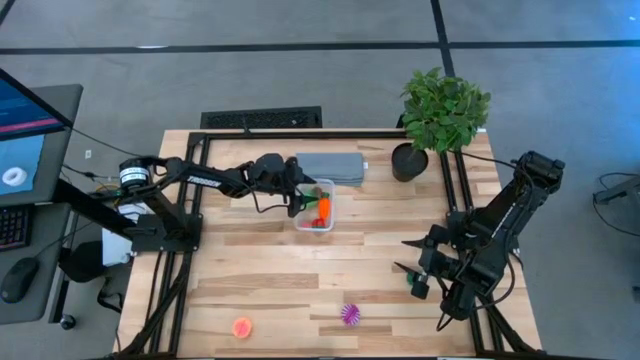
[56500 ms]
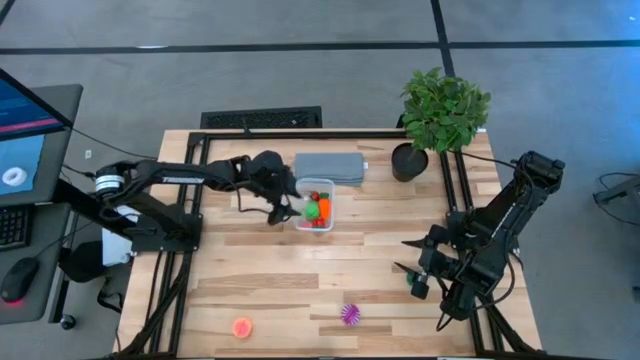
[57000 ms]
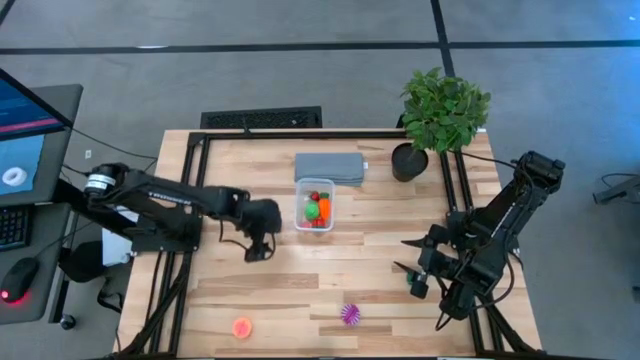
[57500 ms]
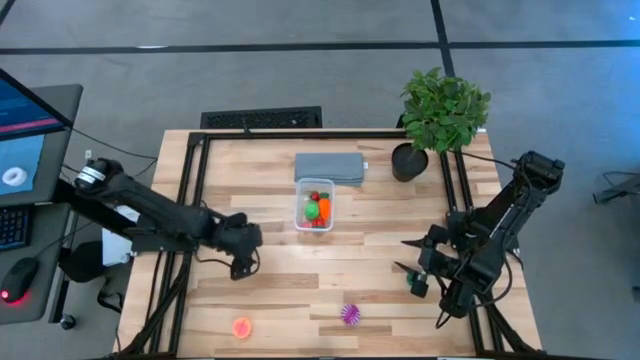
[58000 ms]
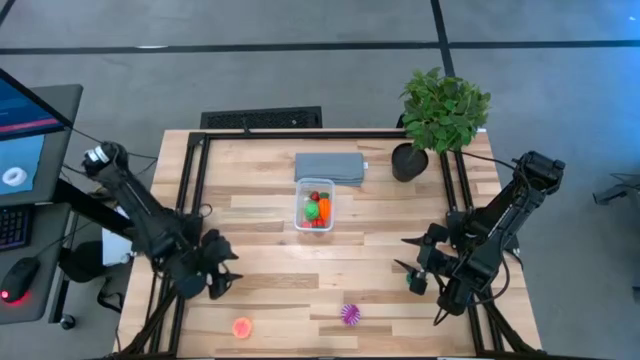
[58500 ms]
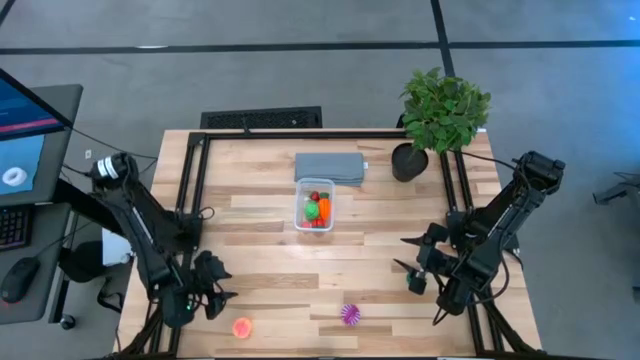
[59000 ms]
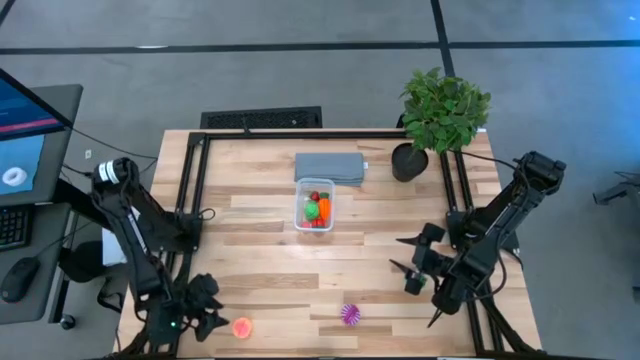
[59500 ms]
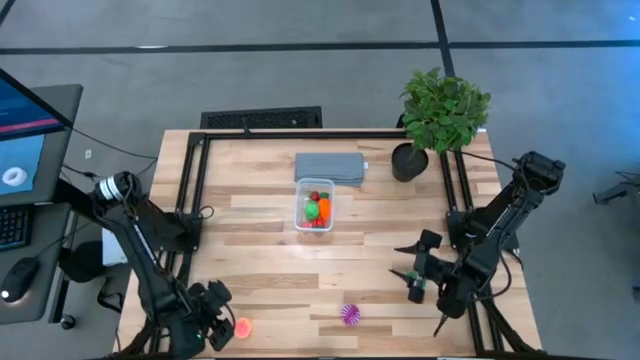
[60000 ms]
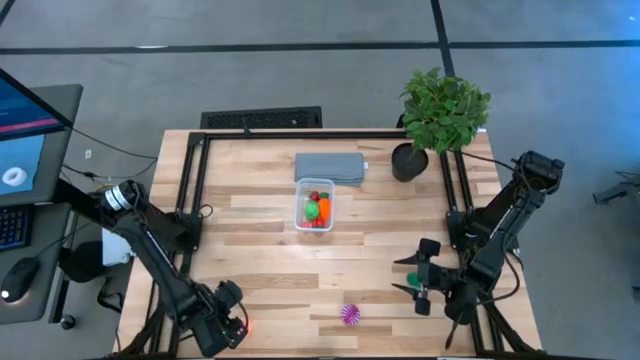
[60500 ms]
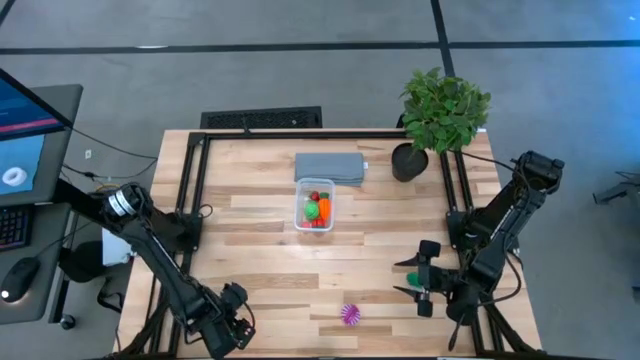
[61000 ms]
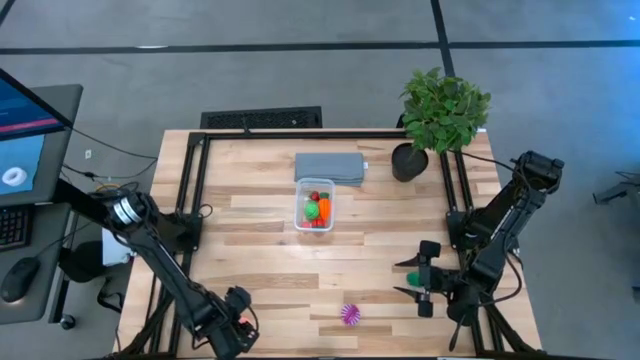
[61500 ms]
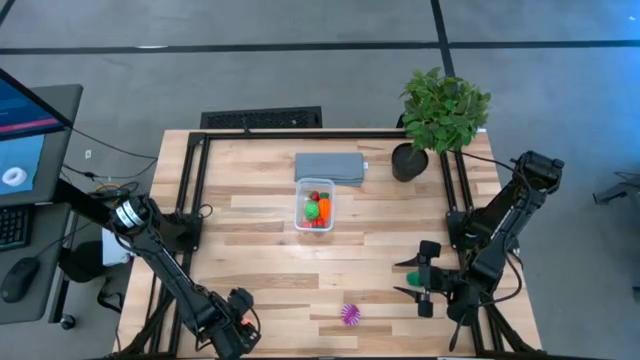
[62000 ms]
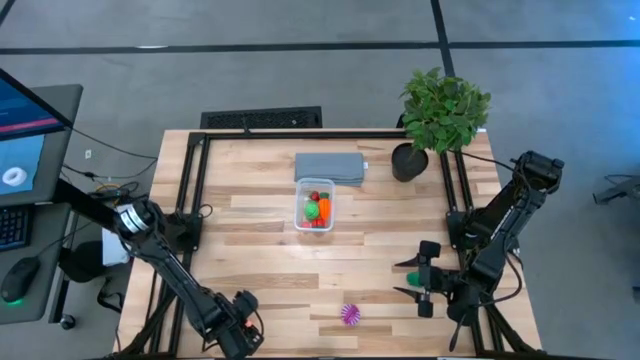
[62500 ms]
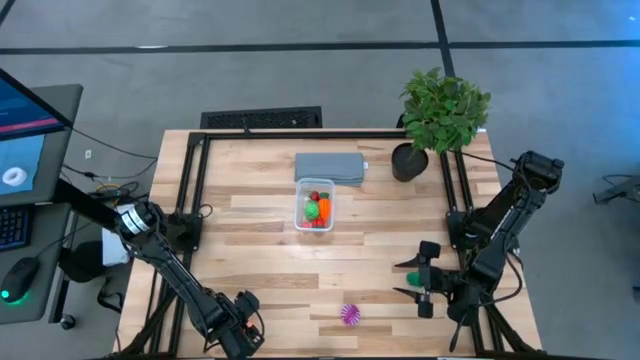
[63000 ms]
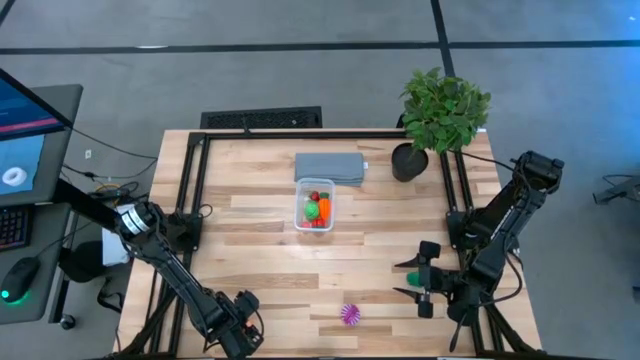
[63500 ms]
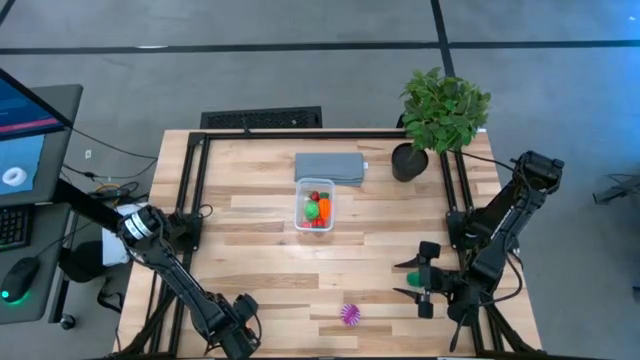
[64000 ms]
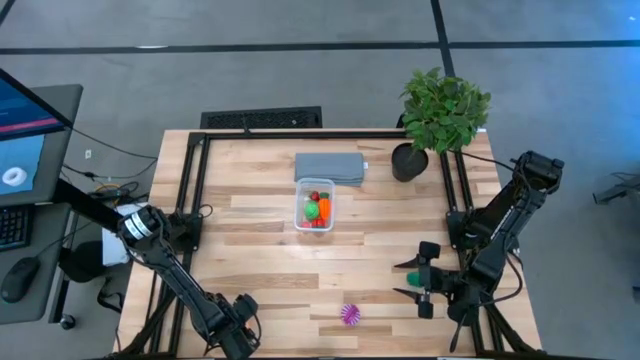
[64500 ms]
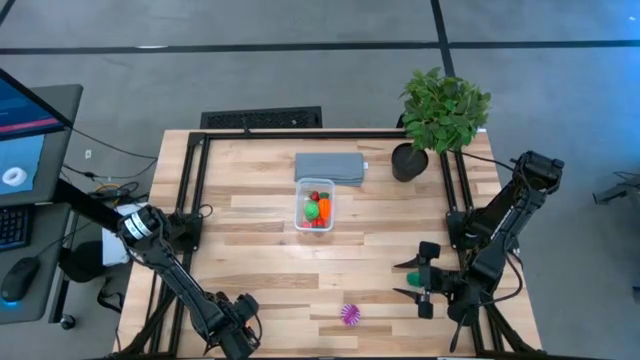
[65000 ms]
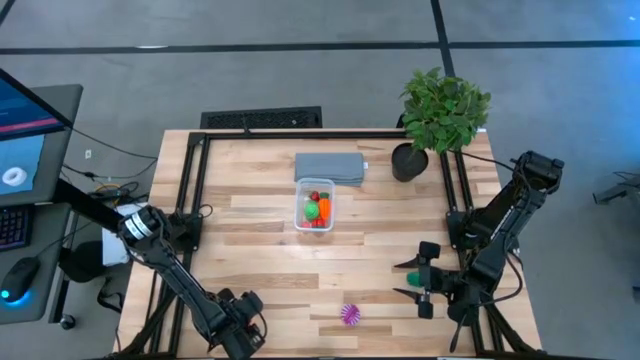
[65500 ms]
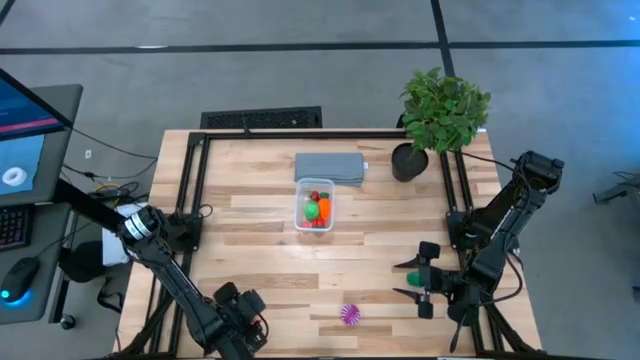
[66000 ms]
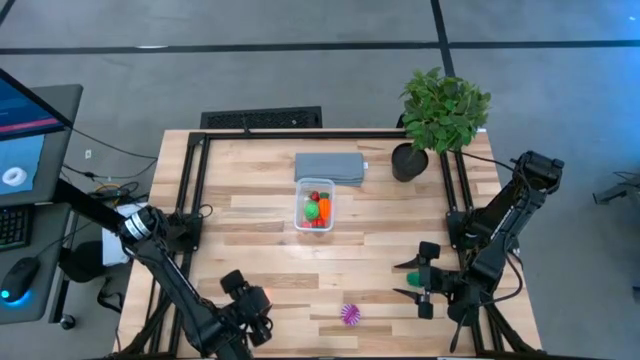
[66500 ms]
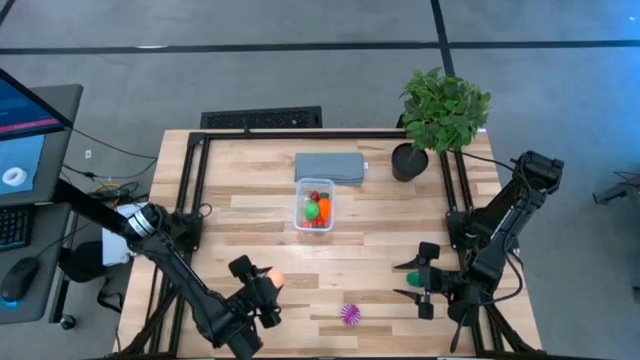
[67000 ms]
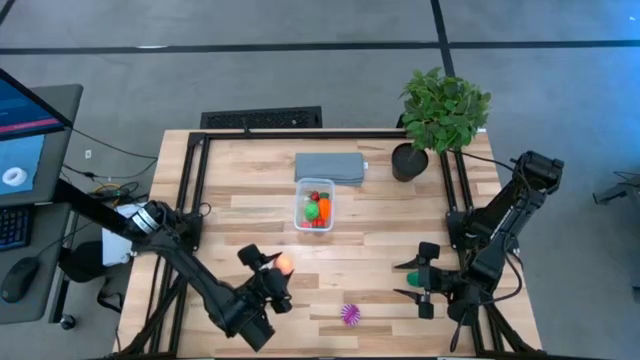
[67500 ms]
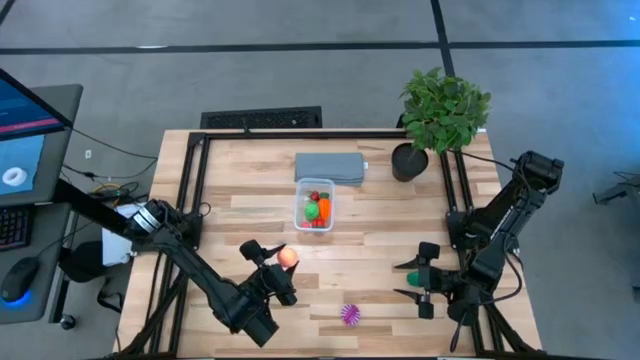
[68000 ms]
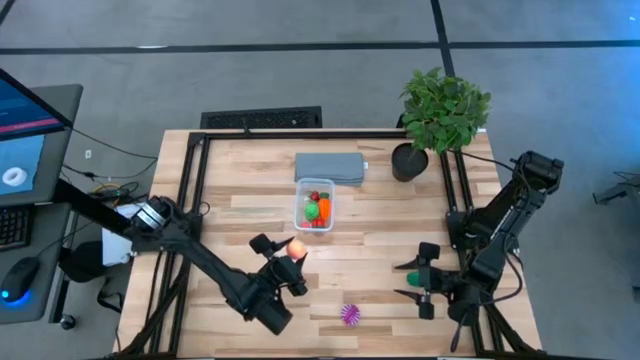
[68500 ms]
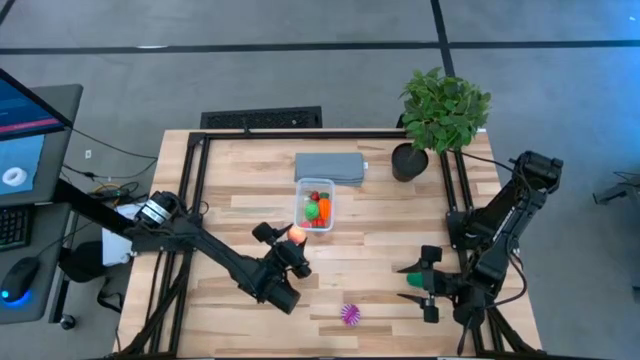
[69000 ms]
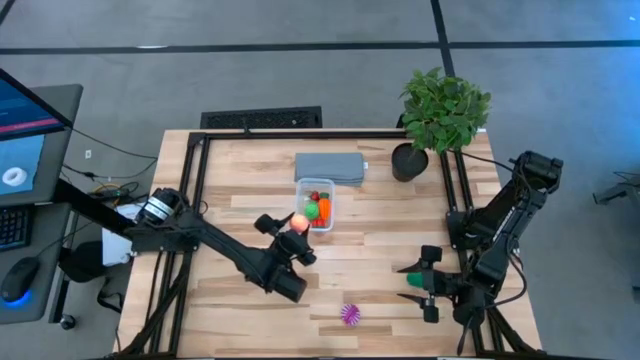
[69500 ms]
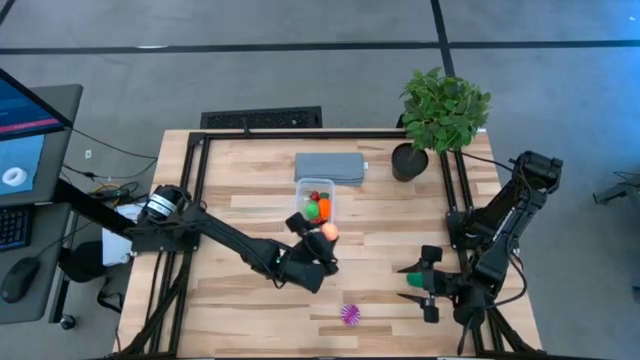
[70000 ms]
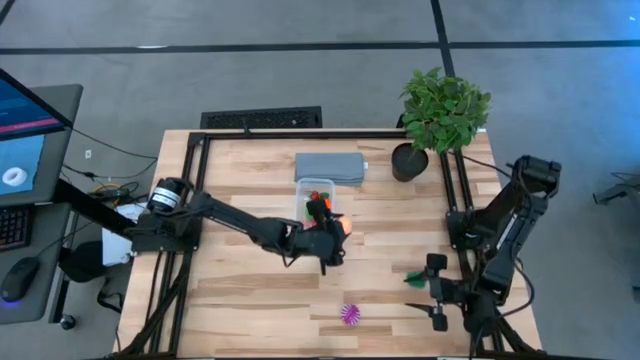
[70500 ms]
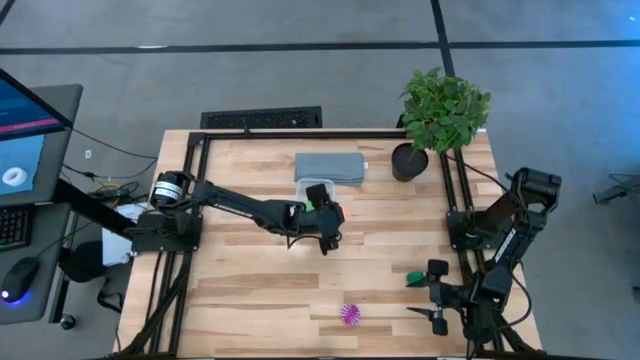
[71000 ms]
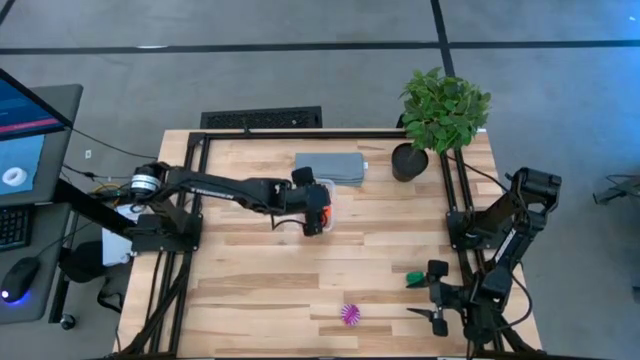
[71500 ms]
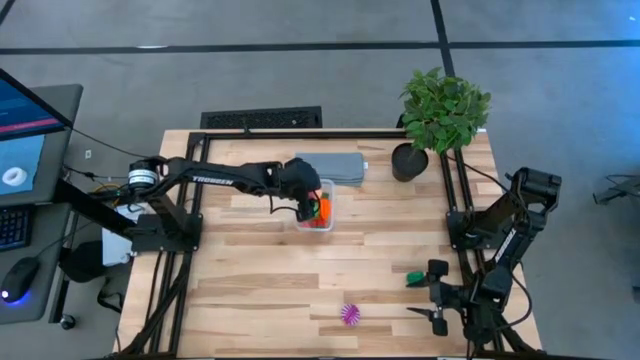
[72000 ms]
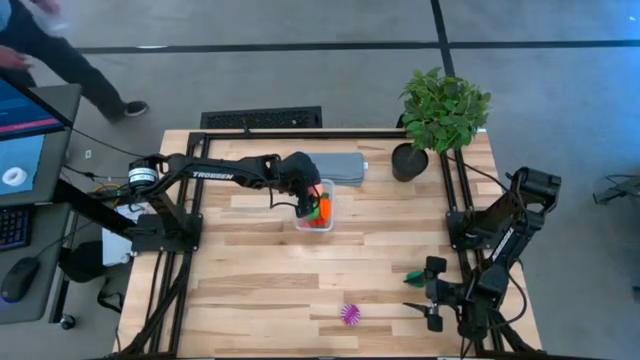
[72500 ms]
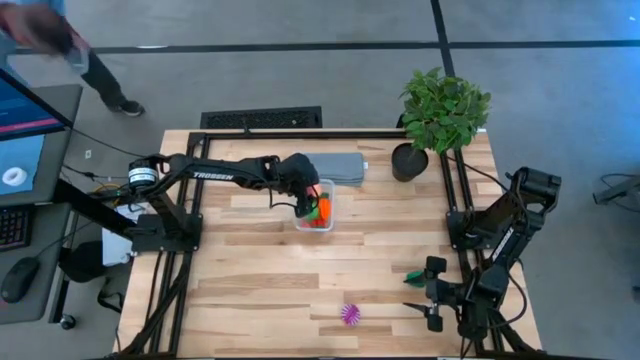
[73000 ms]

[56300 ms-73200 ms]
Task: Pick and placing Produce into tupperware
Put the pink peach into the transparent bin

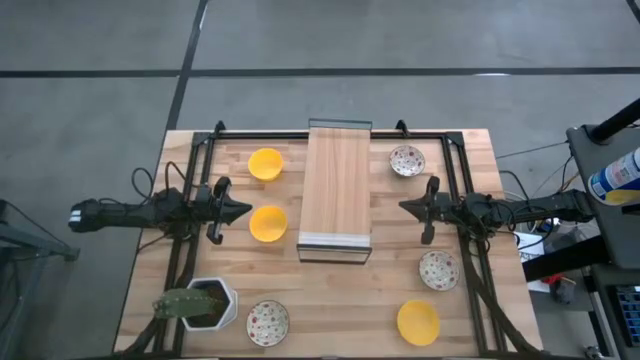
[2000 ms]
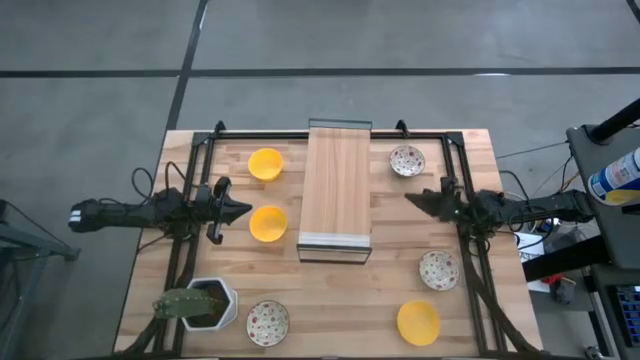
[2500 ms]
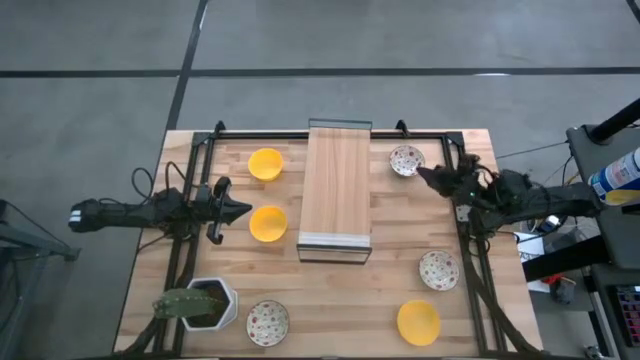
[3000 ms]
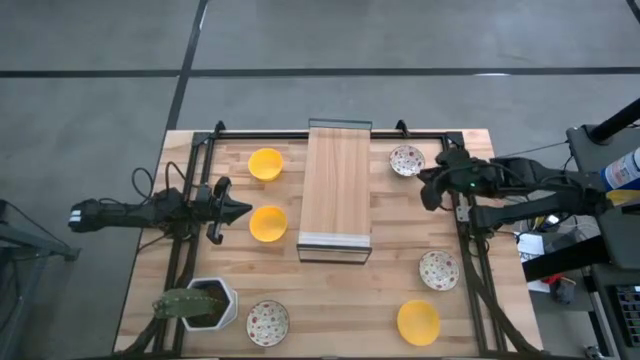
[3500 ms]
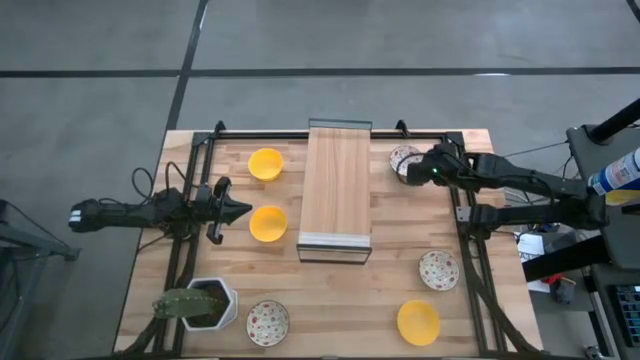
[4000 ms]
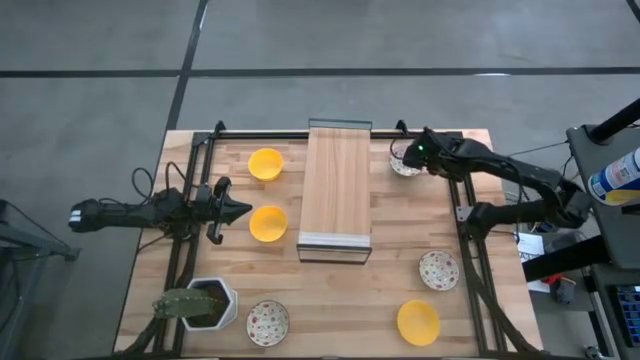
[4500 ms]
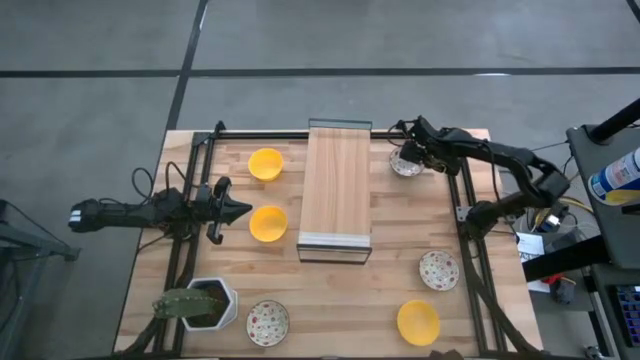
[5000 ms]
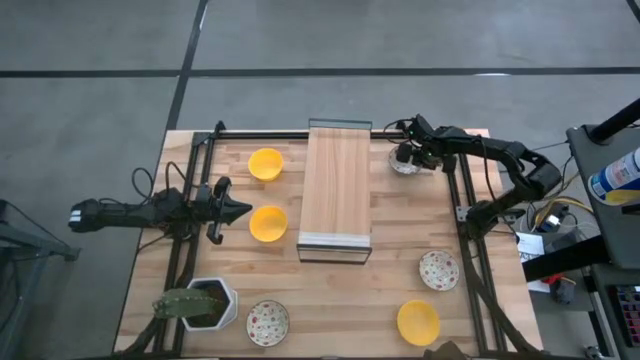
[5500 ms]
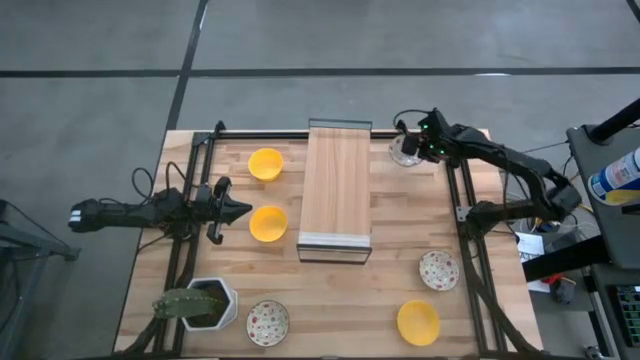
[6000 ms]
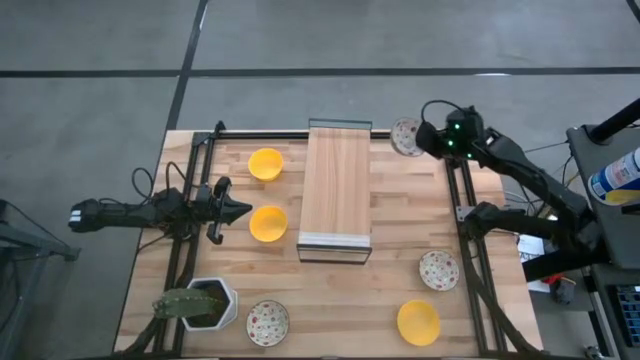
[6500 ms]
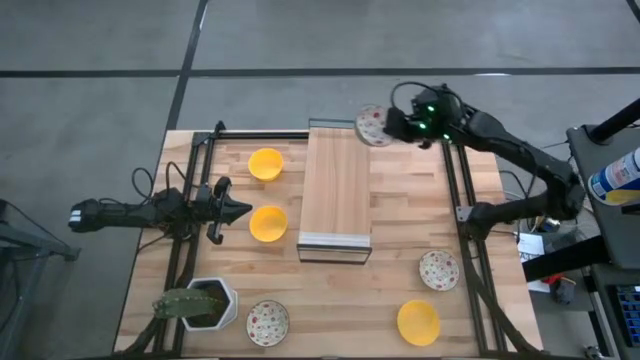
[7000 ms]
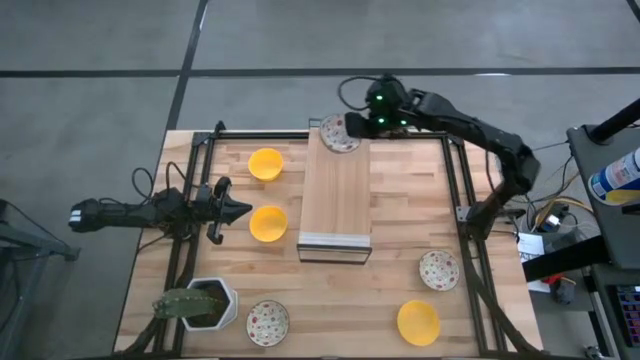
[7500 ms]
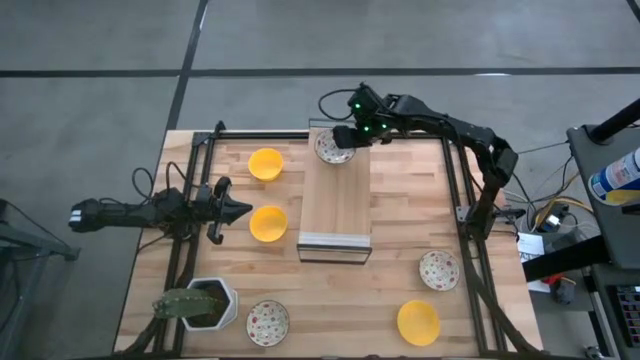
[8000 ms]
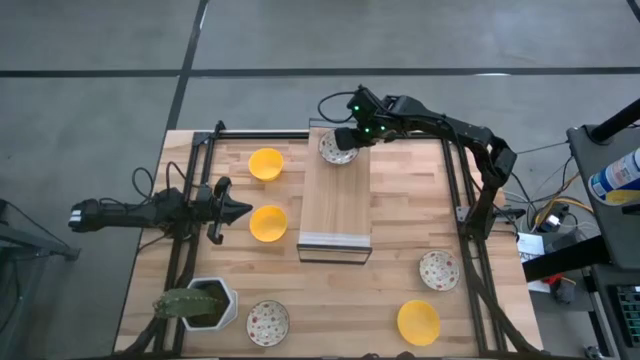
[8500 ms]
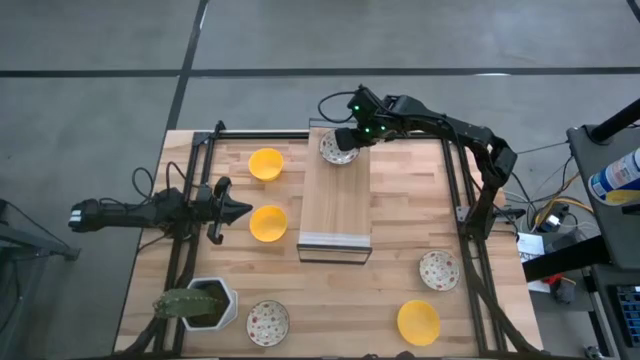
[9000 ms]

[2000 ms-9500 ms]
Task: Pick & Place Mini bowls
Put the top white patterned bowl on the shelf
